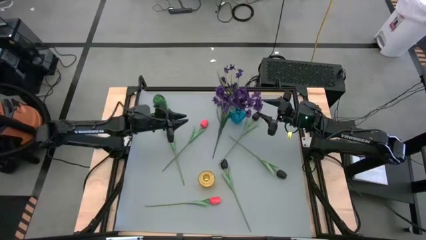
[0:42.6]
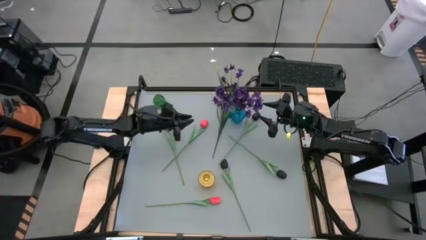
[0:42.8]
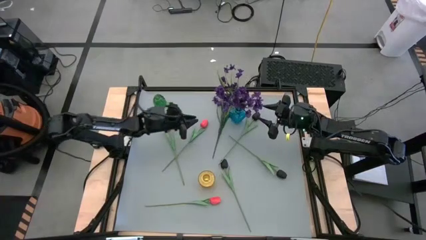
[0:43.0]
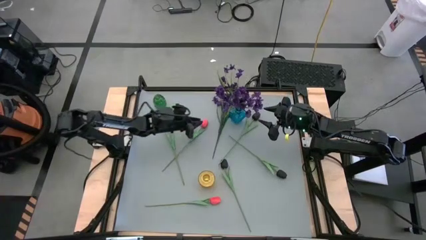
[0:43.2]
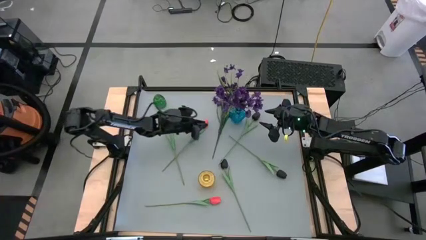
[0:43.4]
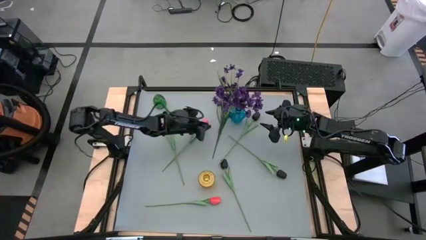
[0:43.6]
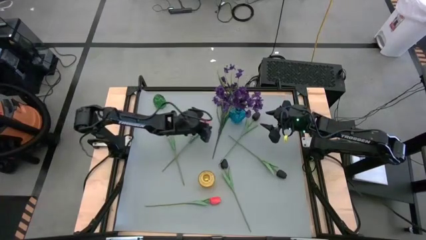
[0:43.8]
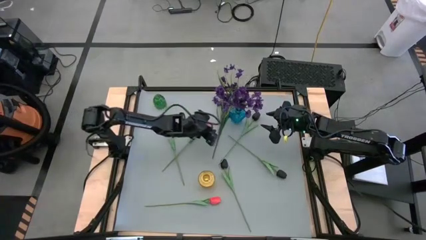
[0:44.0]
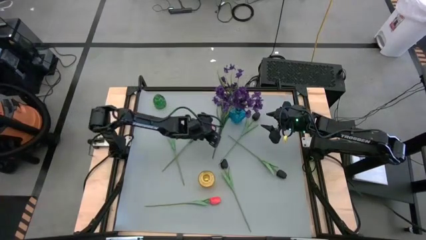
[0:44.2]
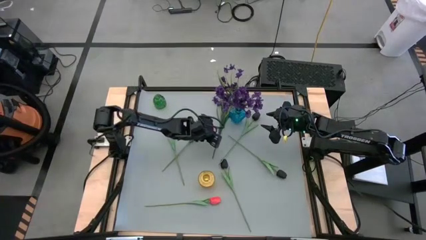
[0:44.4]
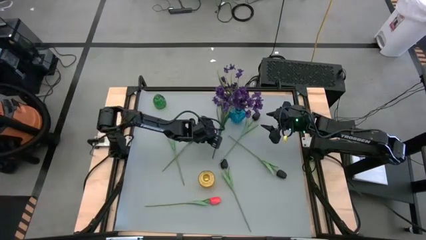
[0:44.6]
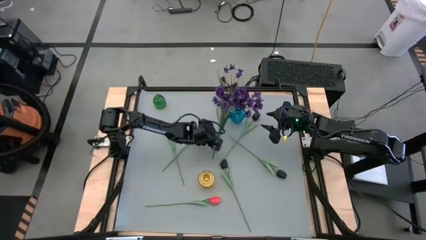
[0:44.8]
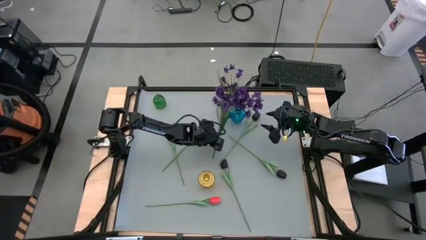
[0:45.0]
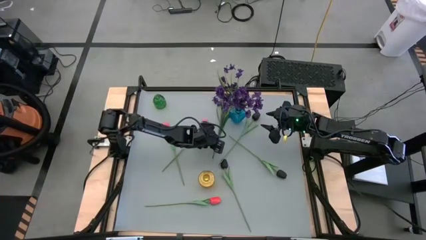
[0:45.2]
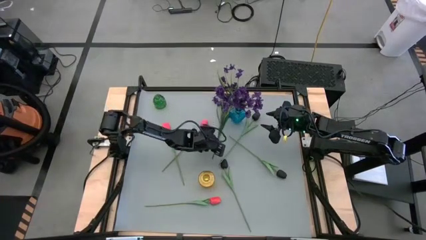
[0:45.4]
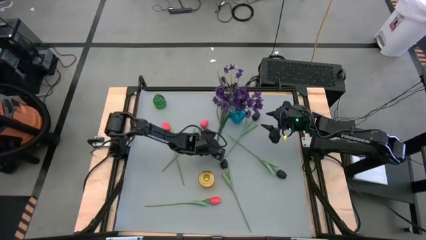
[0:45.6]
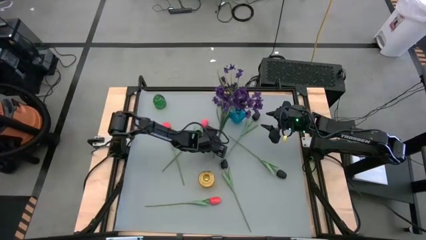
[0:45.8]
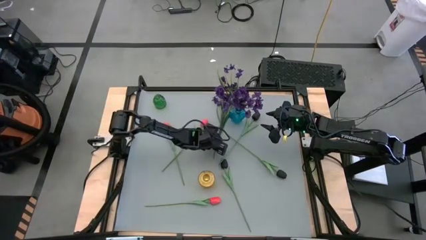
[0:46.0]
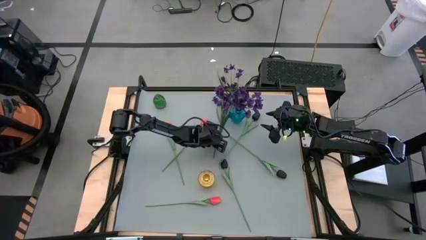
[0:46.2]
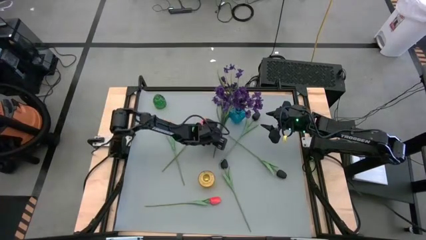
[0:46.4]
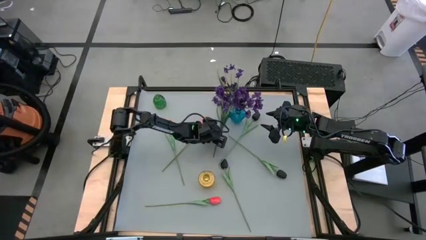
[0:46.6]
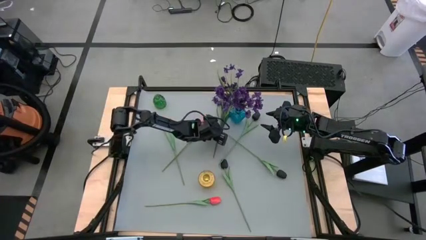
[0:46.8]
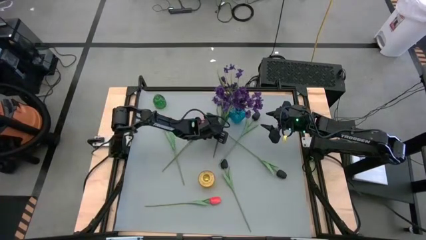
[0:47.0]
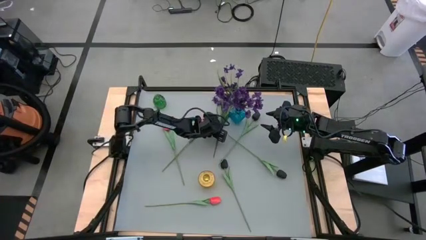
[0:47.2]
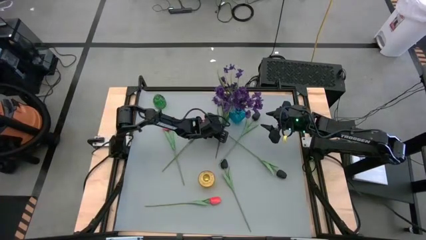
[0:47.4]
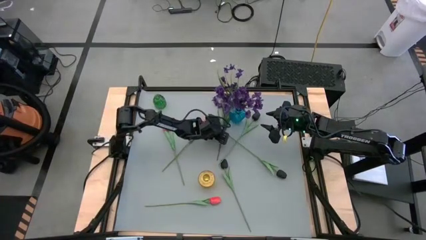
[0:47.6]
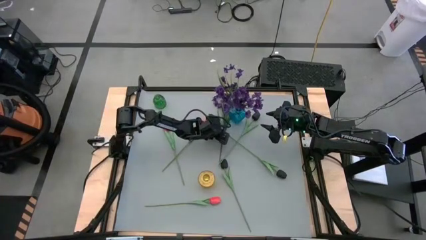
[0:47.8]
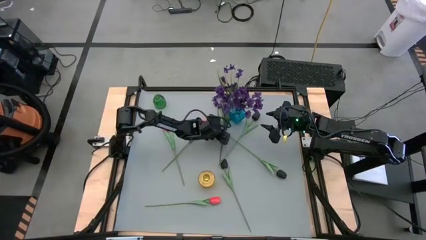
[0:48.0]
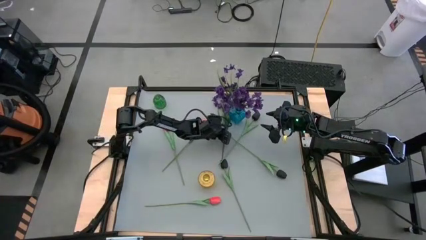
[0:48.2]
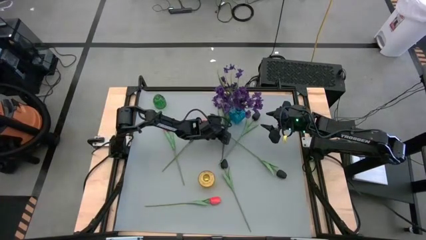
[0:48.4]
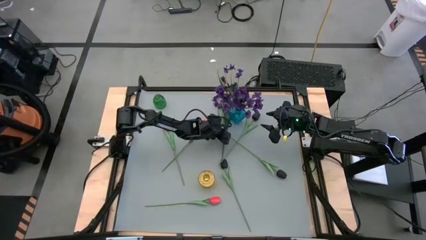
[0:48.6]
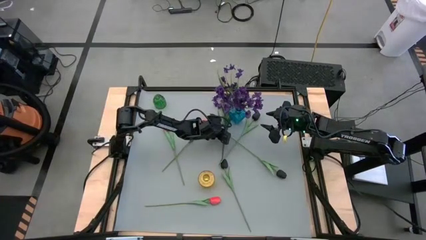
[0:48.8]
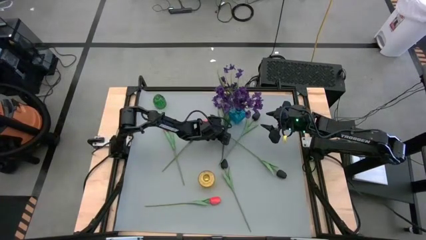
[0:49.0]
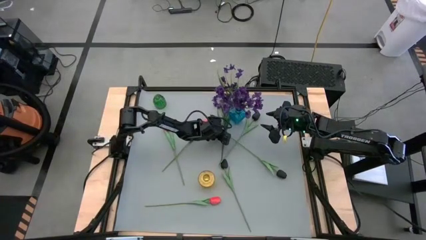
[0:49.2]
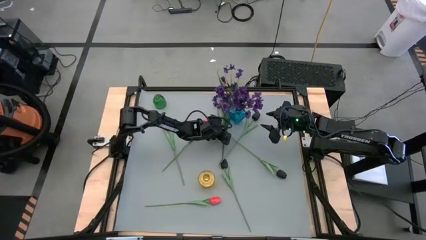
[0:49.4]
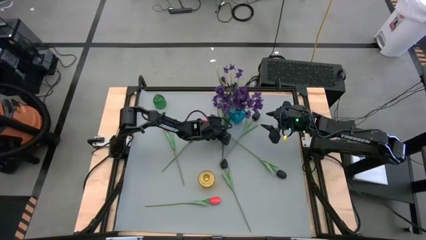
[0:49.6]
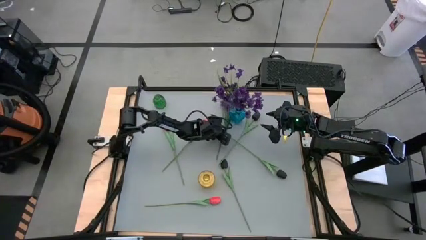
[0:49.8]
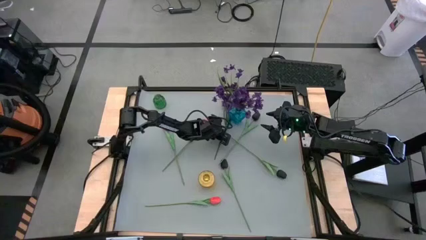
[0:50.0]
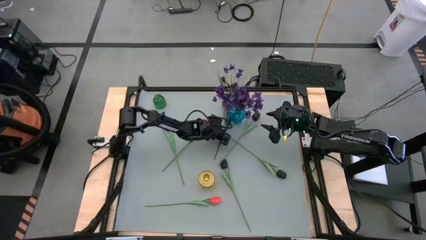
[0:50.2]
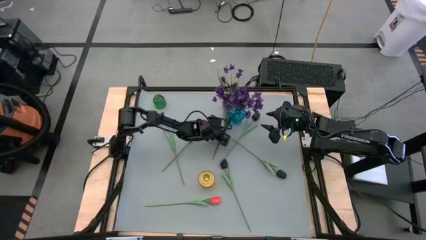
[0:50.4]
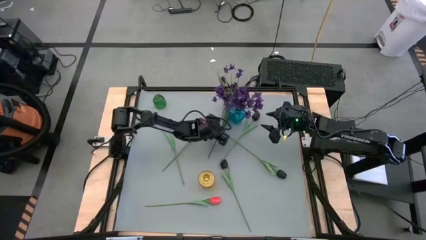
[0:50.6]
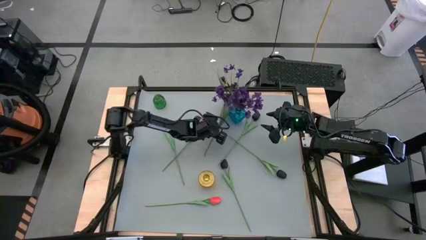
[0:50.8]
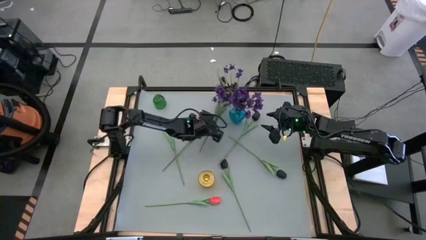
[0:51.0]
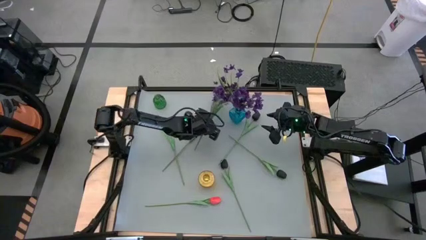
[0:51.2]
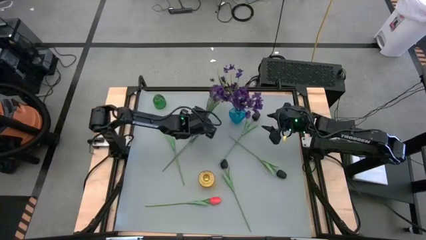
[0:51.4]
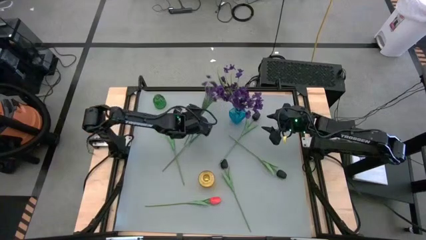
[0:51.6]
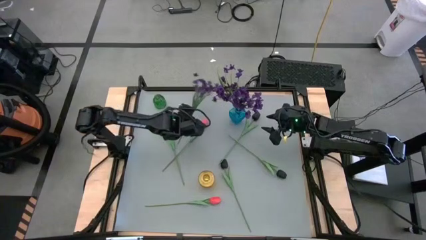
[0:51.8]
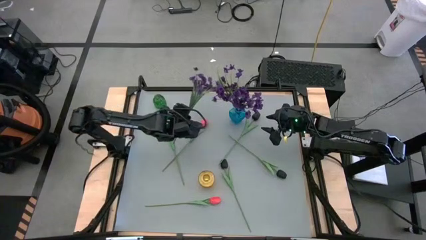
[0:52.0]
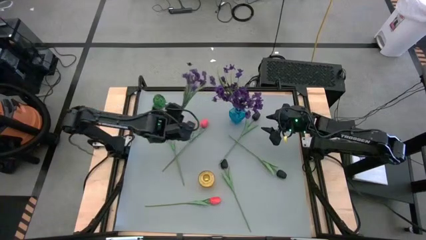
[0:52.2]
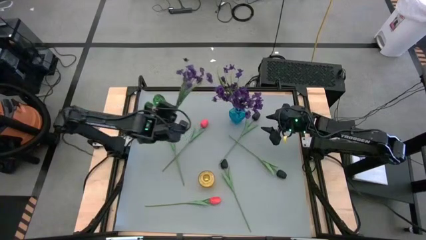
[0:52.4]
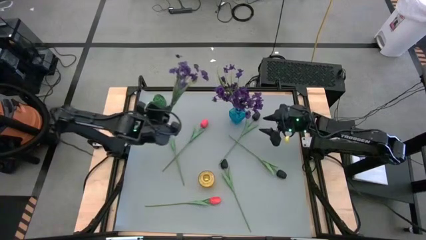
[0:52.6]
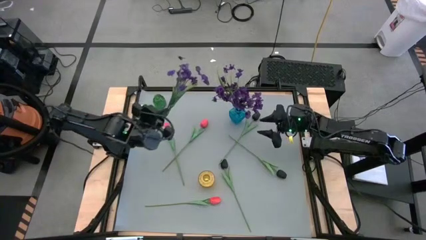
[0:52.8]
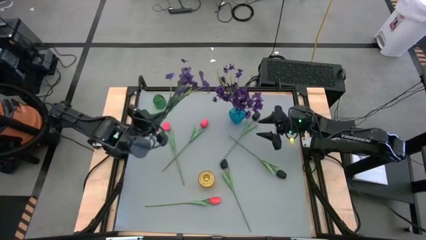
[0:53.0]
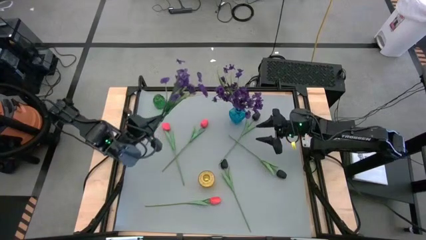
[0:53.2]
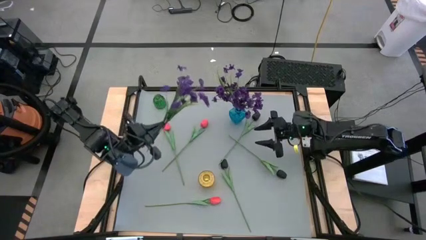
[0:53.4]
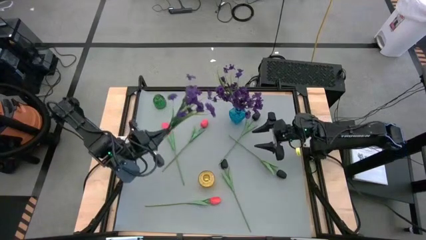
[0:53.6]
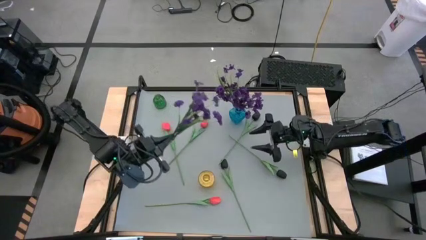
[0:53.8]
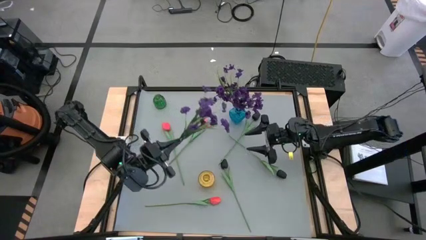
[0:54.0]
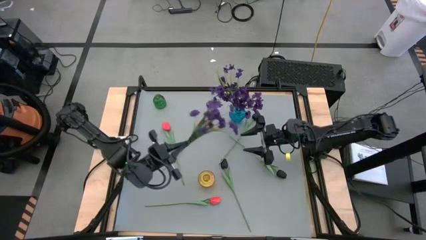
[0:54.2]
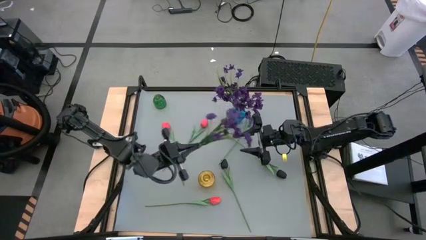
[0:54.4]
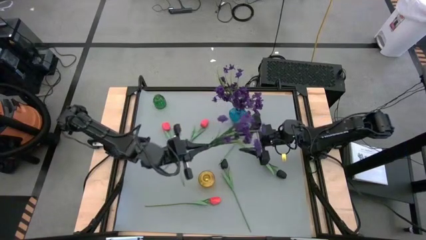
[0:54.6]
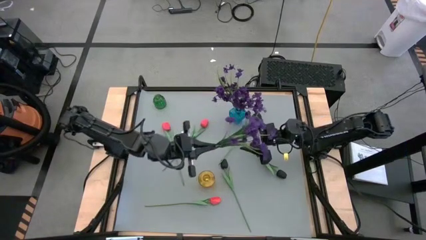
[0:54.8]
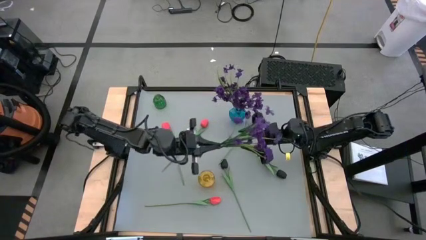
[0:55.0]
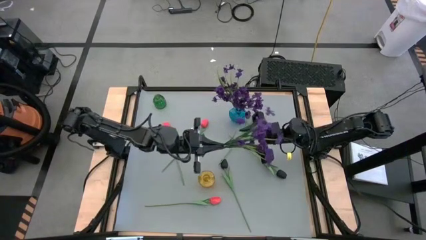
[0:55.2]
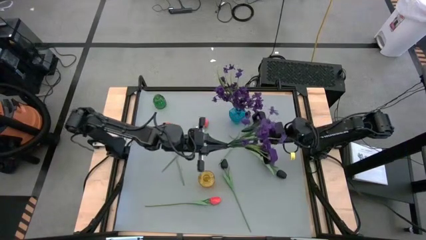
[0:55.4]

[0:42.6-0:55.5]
Task: Sort flowers into vase by color
Put the purple flowers into the blue vase

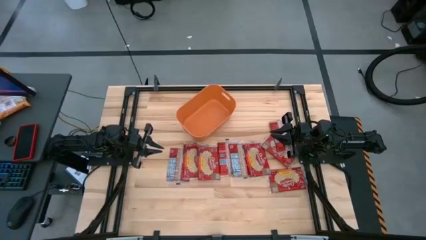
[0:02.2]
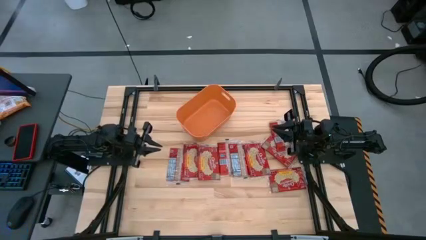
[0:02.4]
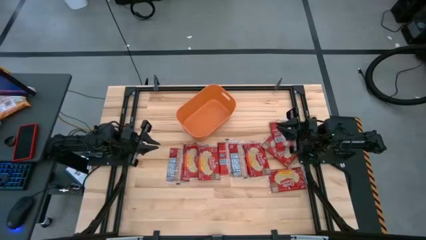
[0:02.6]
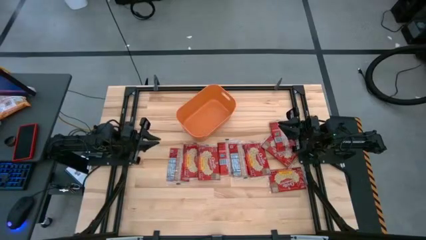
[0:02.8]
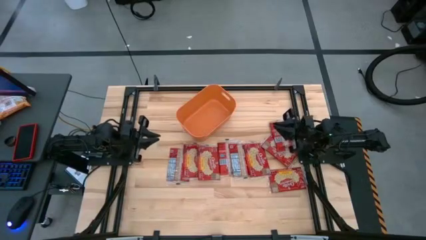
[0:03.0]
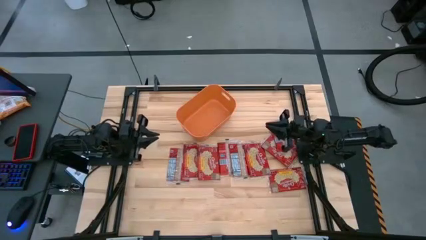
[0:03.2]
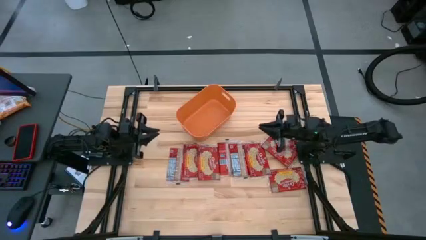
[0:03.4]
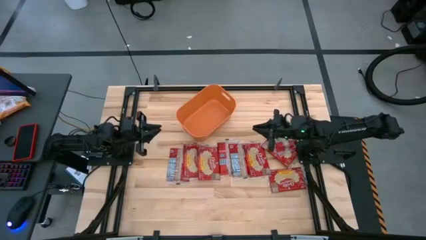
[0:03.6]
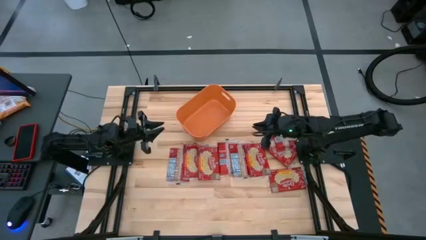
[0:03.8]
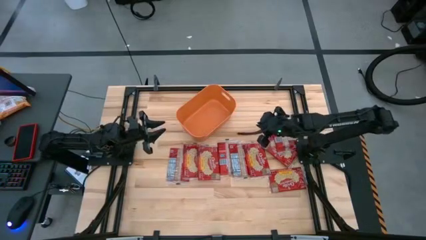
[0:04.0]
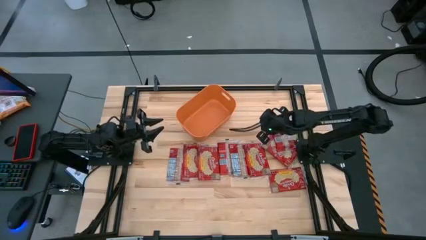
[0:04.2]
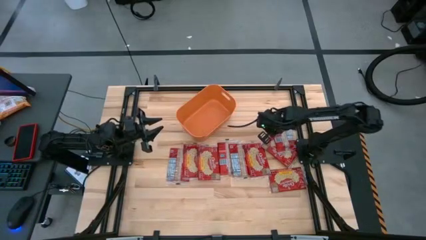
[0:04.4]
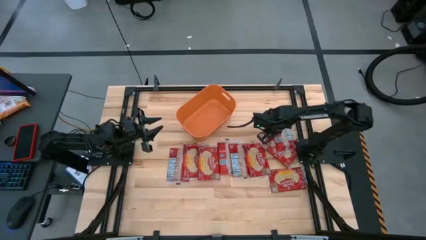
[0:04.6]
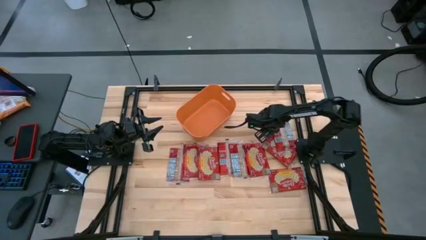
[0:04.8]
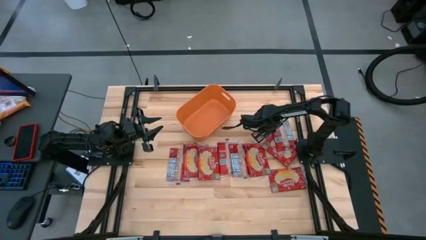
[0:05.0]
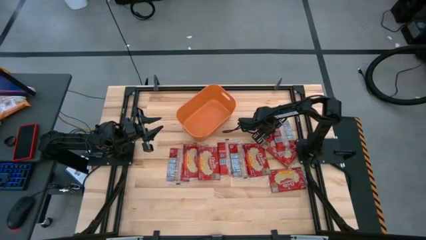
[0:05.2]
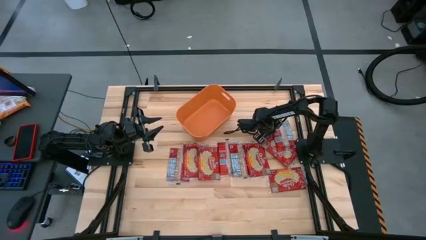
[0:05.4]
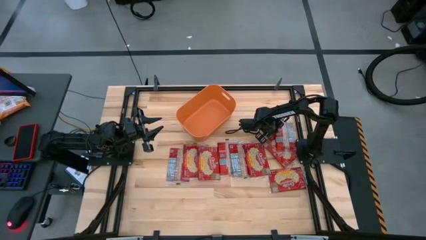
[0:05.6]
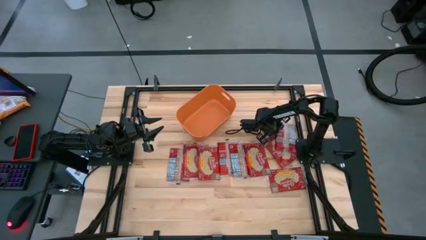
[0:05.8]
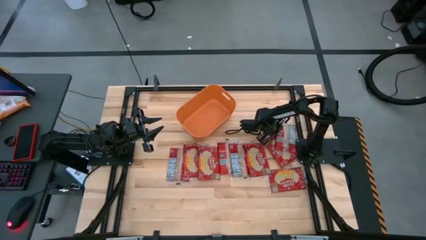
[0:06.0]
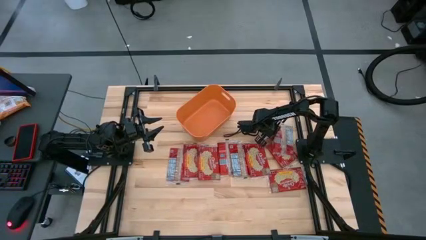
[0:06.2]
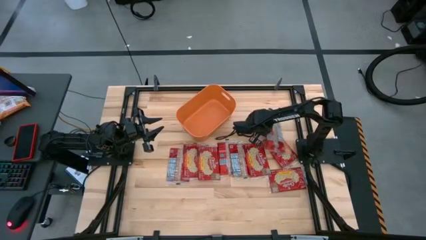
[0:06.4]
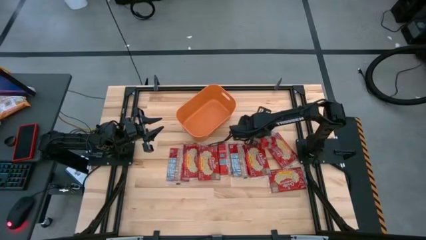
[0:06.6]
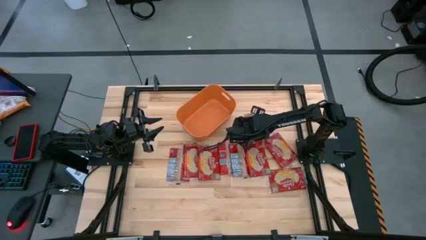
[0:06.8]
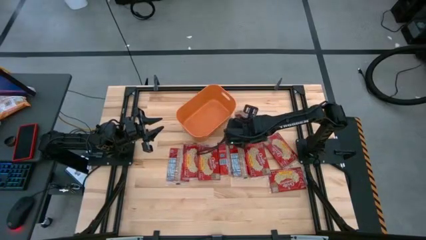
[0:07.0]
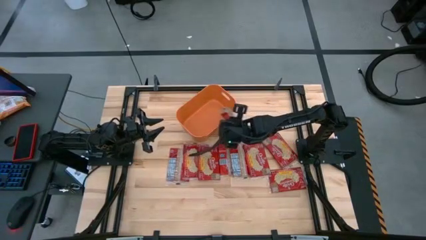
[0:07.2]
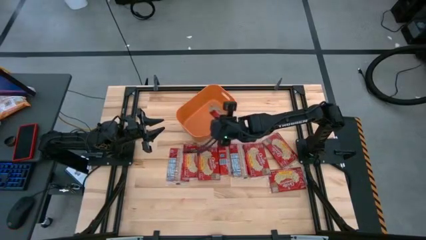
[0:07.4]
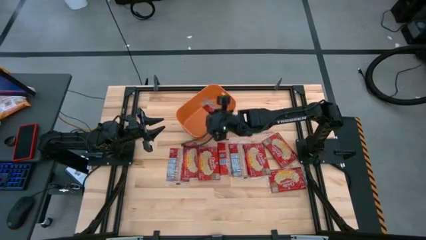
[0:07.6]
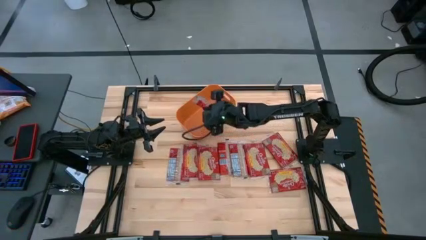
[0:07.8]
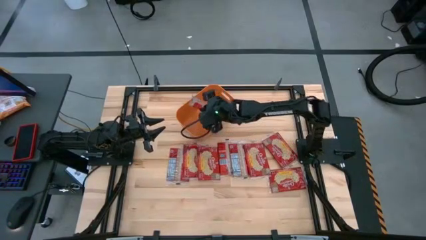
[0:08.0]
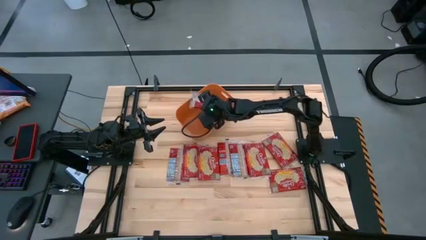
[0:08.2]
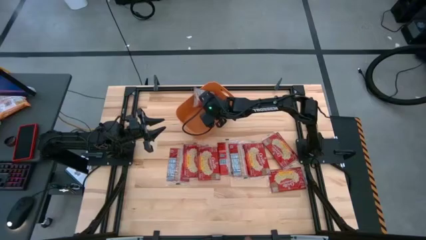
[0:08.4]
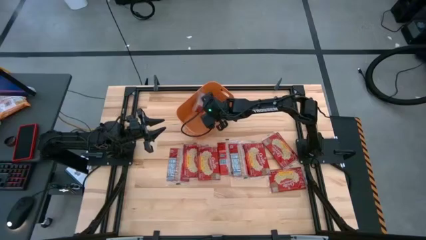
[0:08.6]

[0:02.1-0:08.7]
Task: Sort popcorn bags into baskets
Put the red popcorn bag into the orange bin
